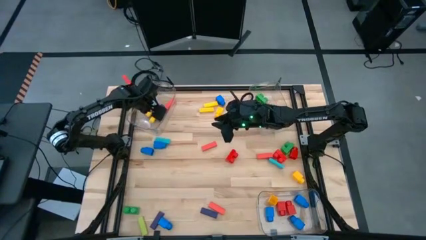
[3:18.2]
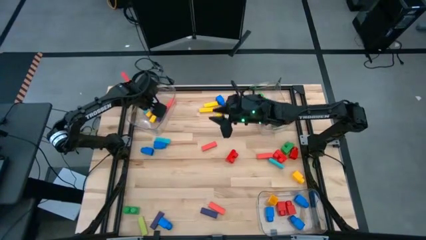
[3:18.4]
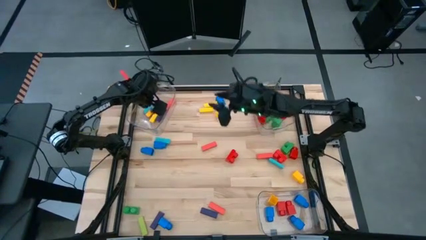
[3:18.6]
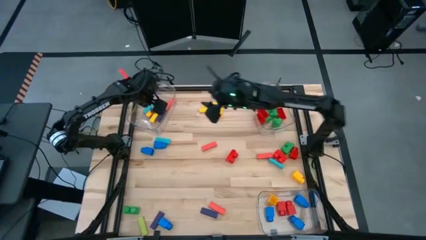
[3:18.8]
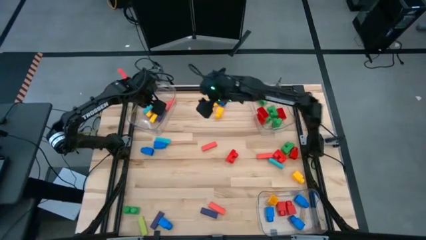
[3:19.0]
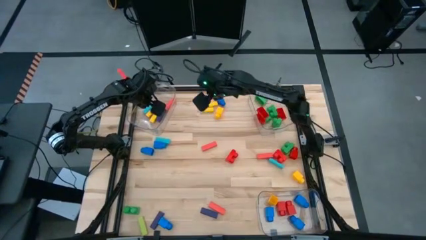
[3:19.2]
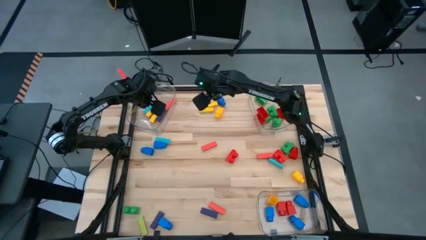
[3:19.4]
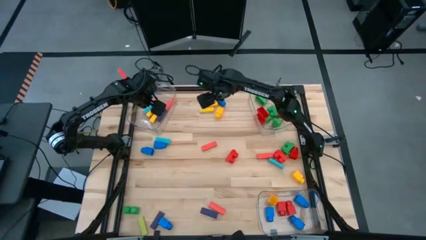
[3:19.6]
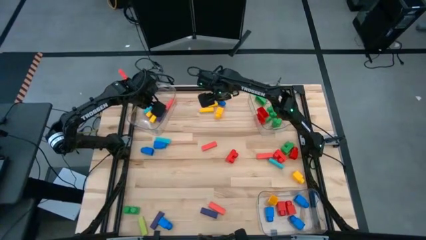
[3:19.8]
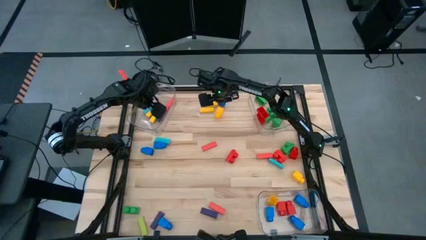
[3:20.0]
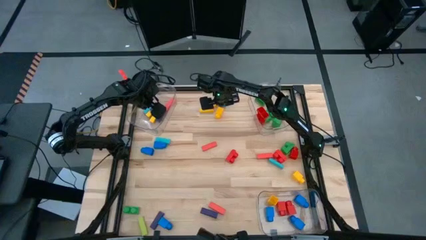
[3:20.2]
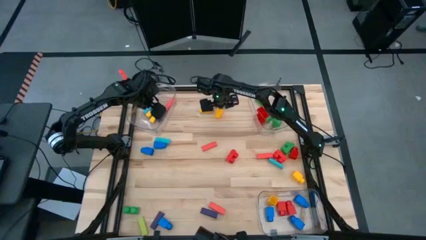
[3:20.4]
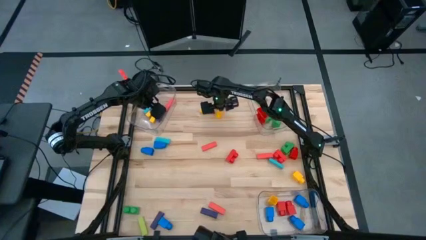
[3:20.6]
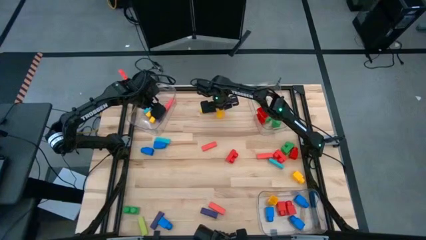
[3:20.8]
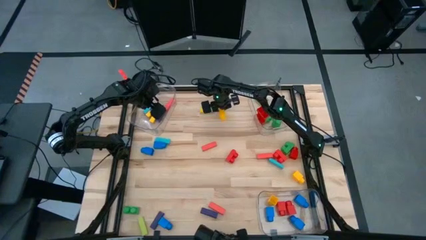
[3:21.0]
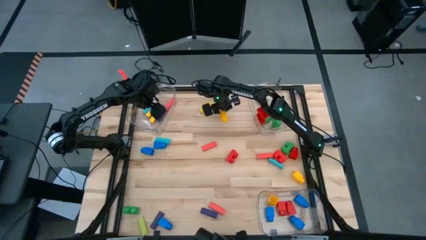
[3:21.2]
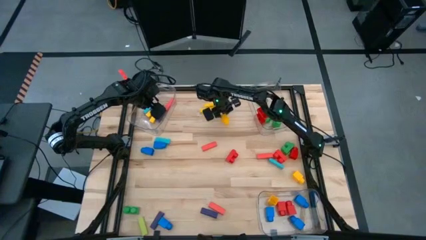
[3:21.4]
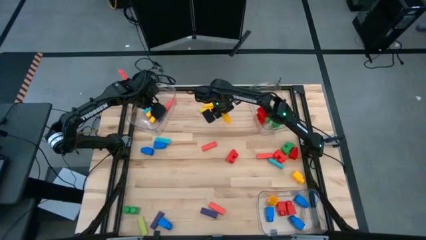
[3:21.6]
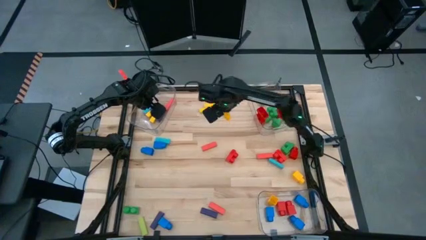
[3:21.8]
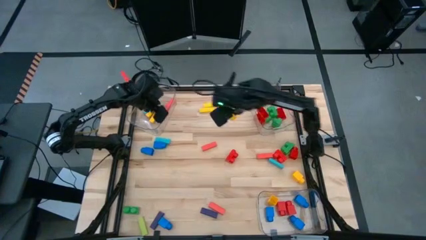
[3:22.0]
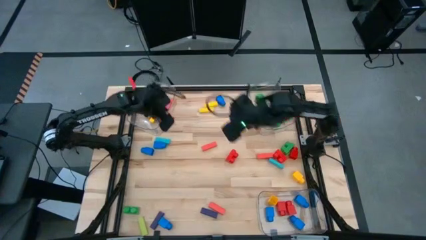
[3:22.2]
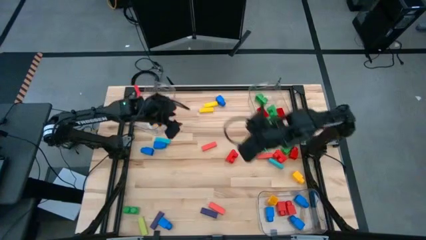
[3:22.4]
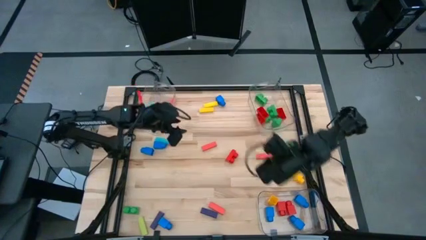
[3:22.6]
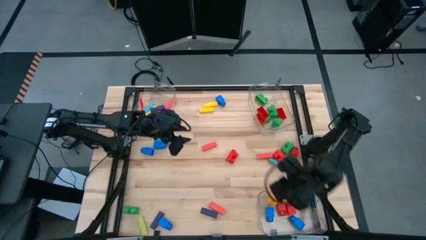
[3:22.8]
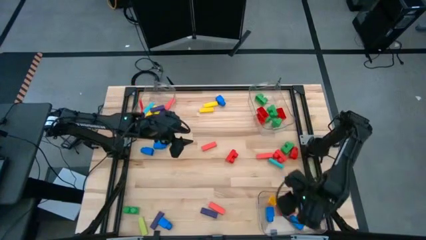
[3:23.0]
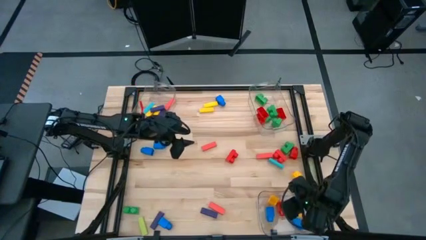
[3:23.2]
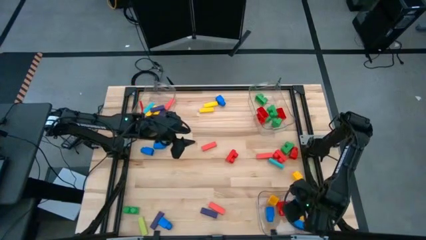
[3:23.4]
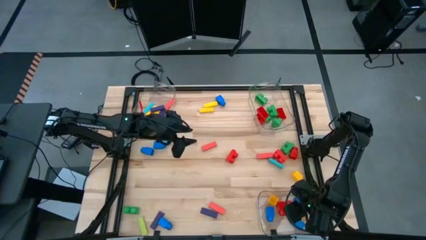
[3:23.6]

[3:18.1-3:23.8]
Task: Sort blocks by size
Put the yellow 1 stud game piece into the bottom transparent bin

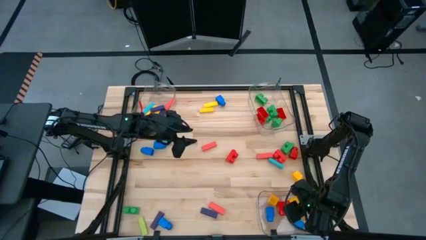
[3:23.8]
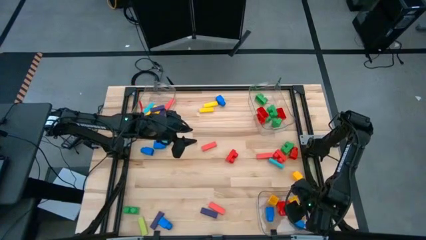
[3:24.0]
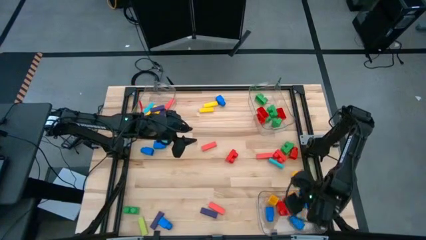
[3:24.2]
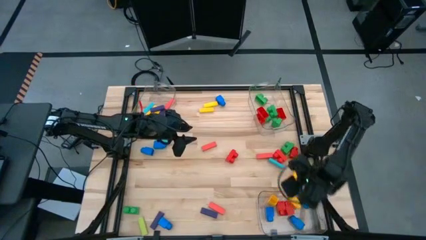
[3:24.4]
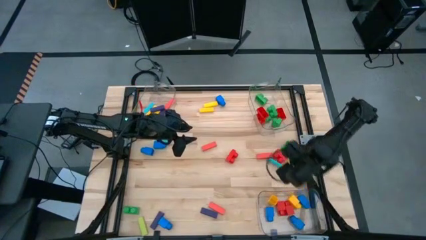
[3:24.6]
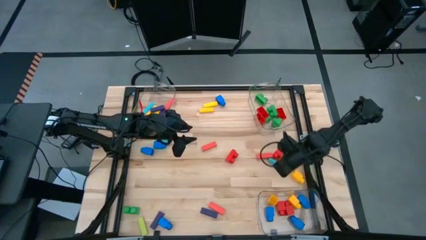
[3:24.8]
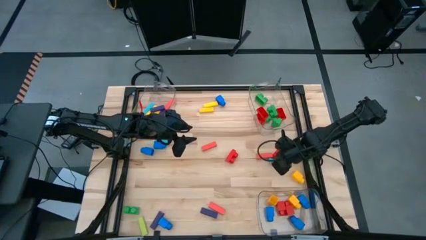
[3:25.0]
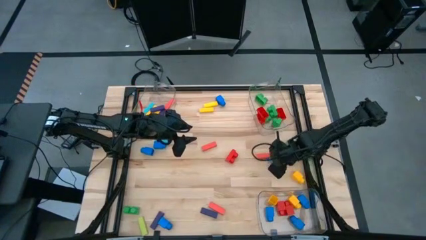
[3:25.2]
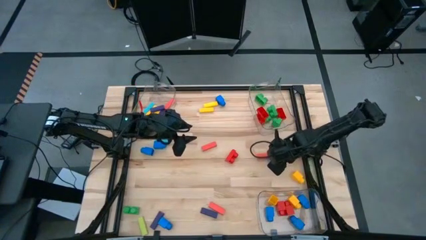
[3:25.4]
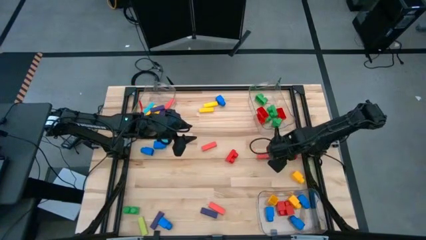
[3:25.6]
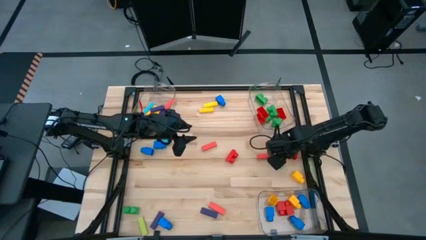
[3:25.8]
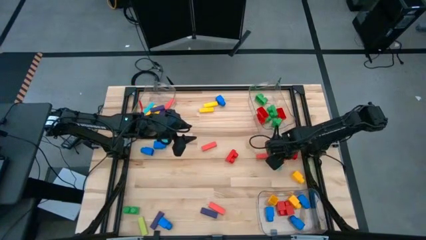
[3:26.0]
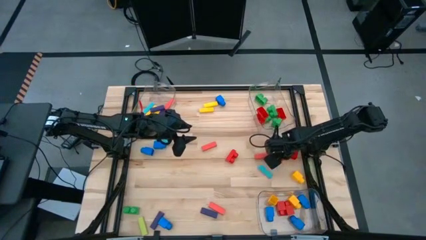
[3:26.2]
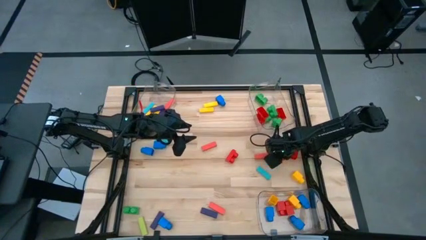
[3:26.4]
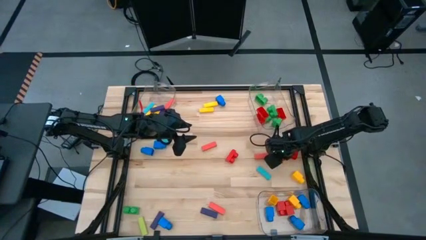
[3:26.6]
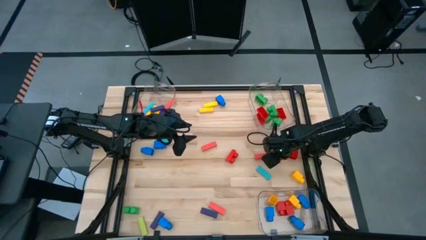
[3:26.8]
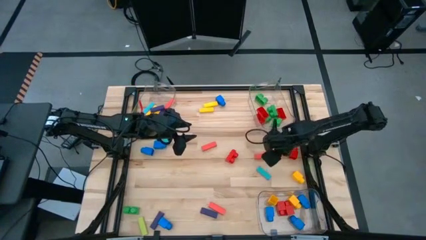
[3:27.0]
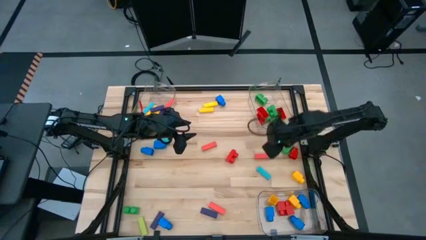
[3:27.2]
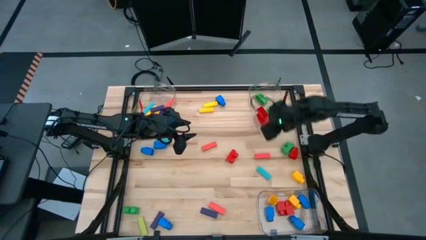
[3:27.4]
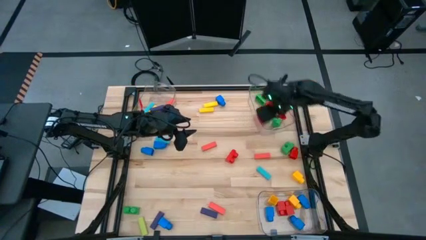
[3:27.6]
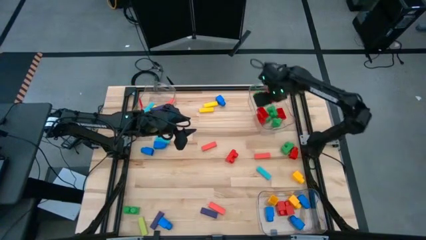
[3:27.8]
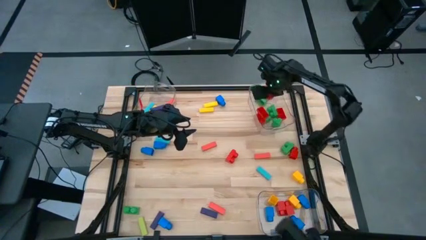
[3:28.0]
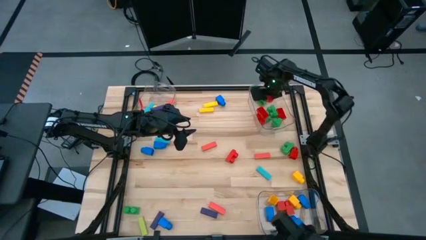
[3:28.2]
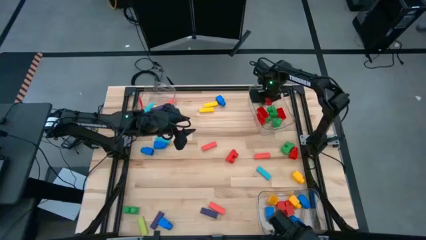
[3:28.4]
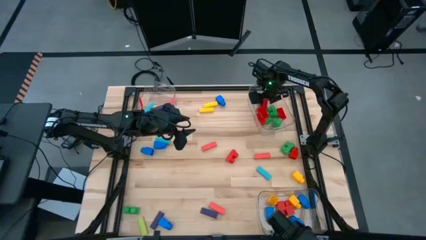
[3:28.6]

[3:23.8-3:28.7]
Put the red 2 stud game piece into the top right transparent bin

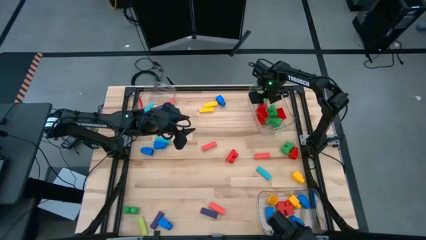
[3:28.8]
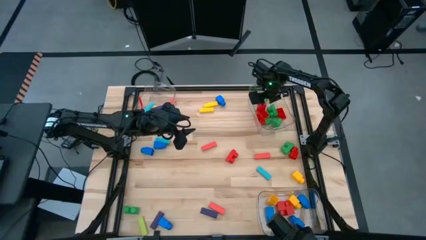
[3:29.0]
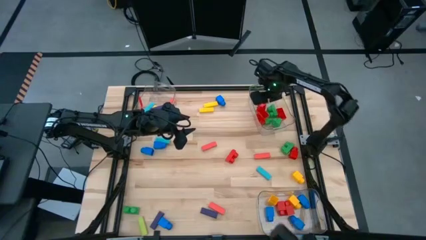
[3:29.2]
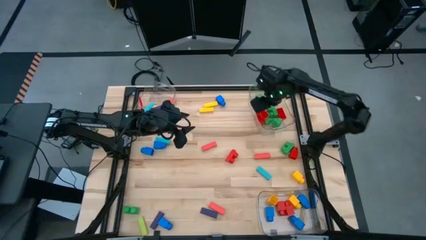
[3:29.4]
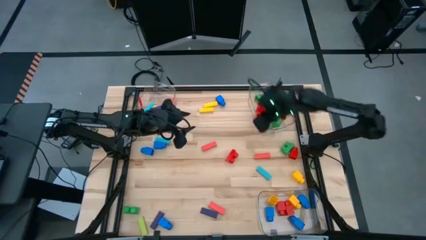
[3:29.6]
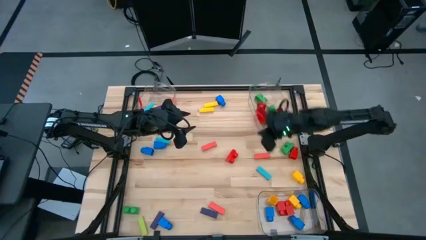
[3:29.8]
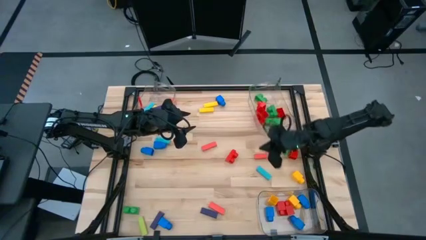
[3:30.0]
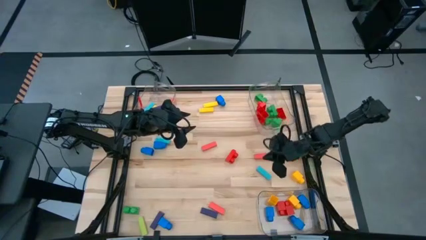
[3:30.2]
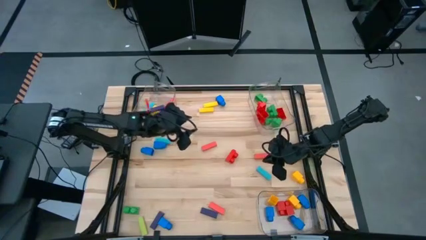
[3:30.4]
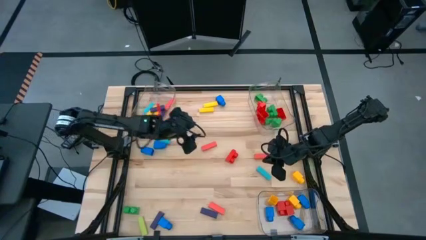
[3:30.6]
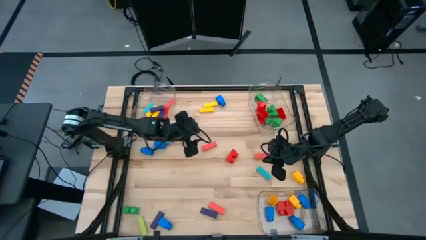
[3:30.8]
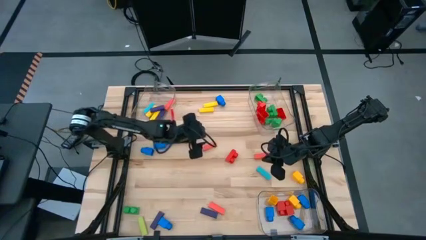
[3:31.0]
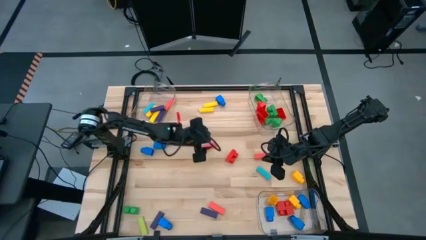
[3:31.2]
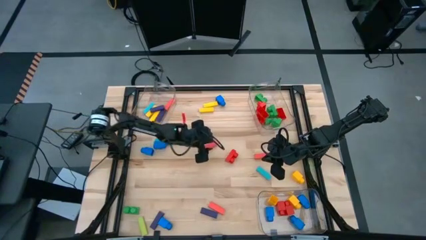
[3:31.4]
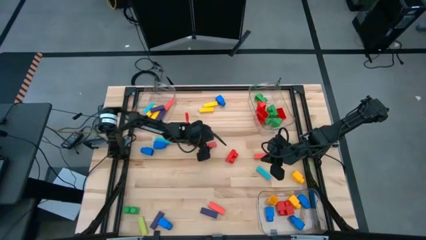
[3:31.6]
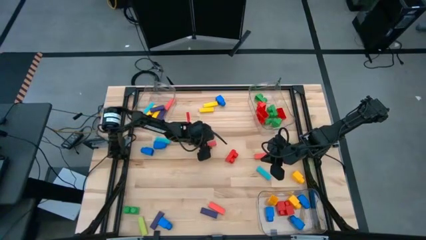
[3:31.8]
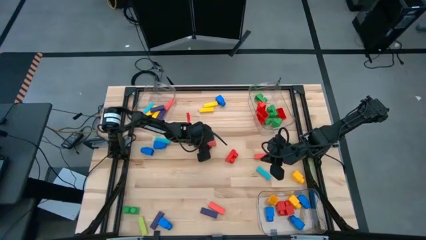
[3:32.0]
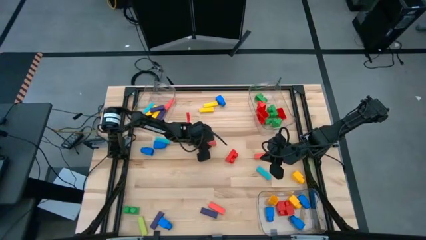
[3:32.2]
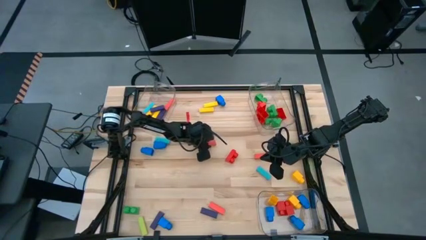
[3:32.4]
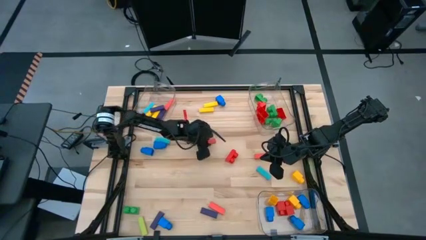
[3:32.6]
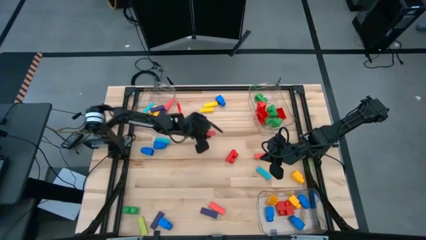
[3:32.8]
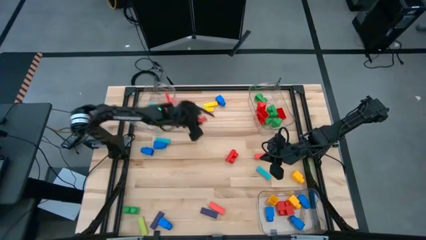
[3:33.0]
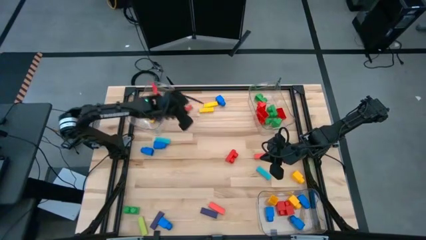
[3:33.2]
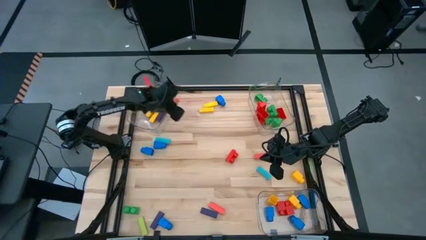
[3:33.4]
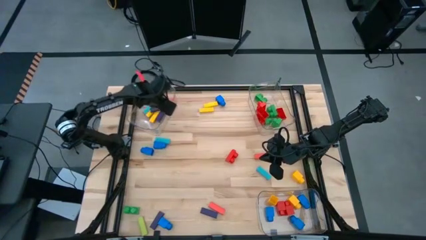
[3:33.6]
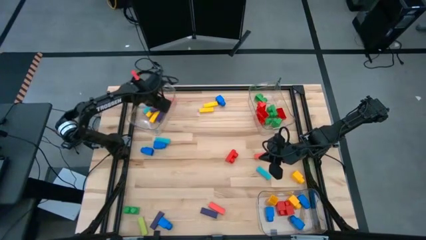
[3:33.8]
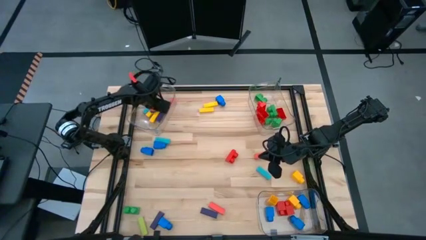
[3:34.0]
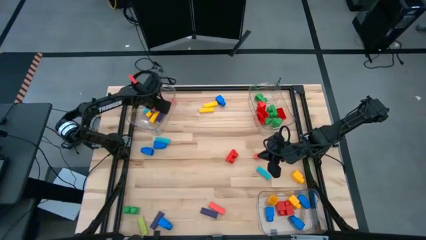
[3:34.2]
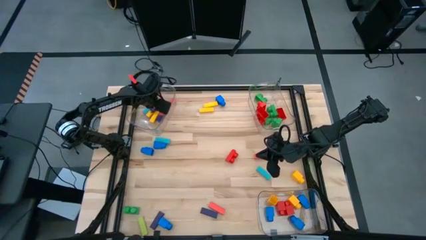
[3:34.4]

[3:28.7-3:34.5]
Put the orange block into the top left transparent bin
